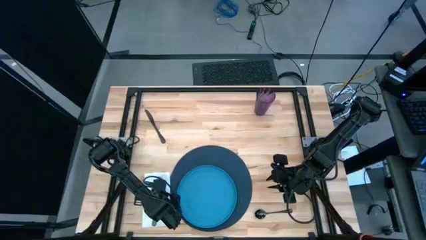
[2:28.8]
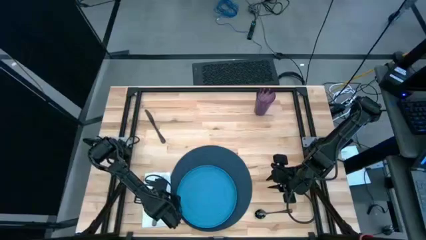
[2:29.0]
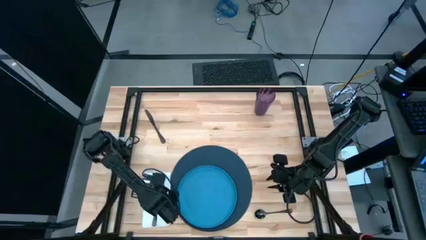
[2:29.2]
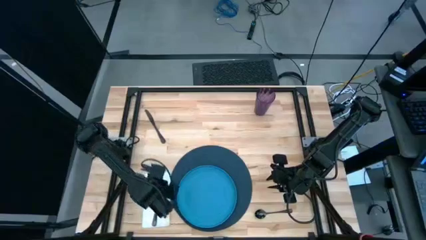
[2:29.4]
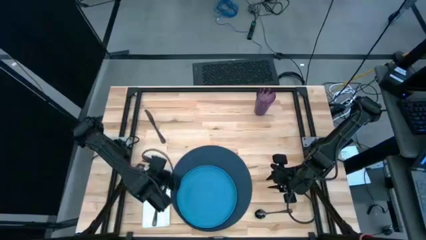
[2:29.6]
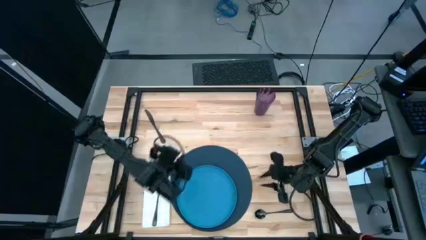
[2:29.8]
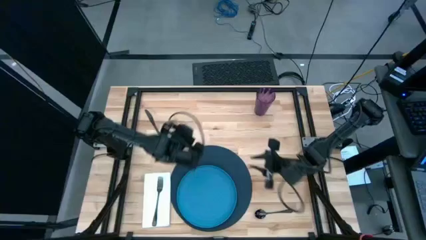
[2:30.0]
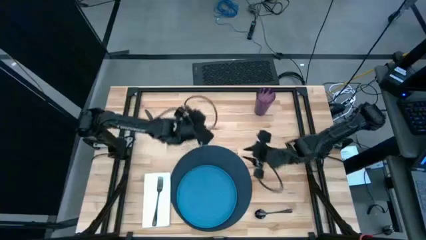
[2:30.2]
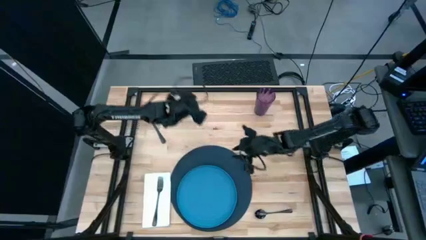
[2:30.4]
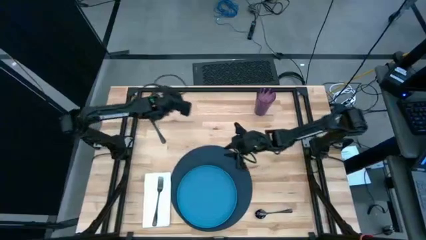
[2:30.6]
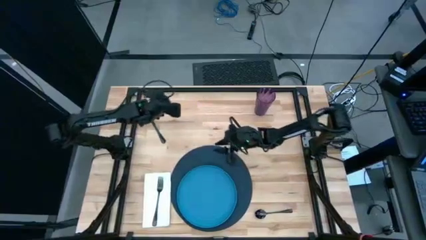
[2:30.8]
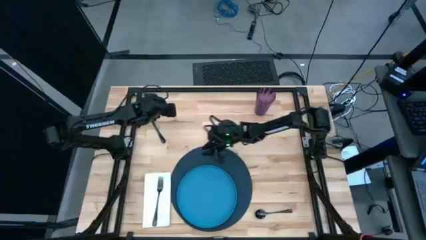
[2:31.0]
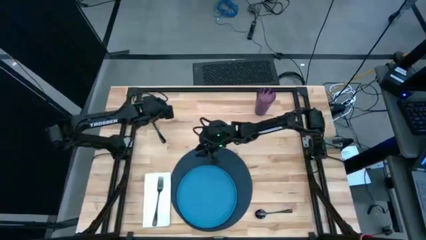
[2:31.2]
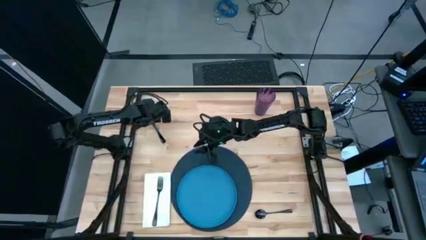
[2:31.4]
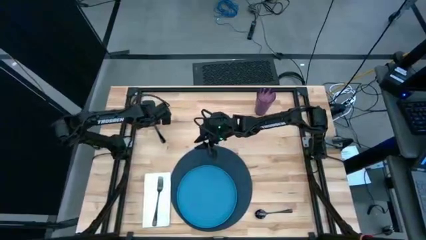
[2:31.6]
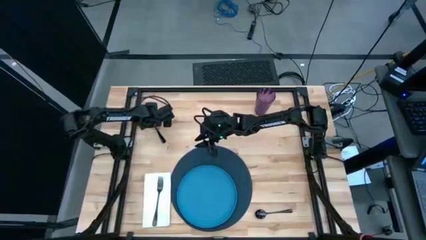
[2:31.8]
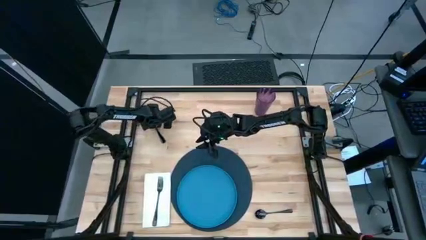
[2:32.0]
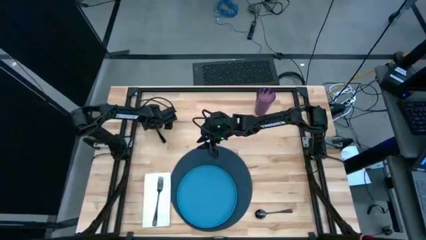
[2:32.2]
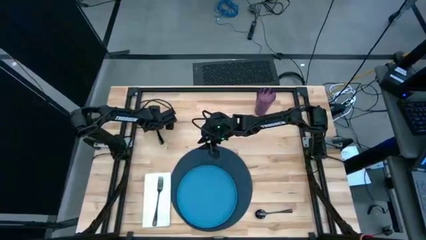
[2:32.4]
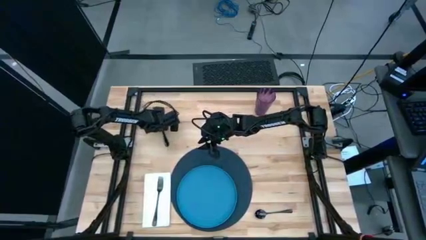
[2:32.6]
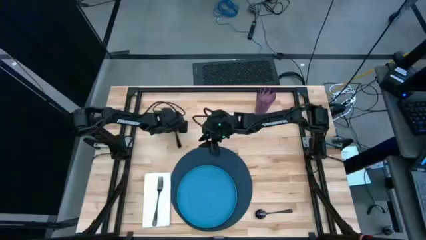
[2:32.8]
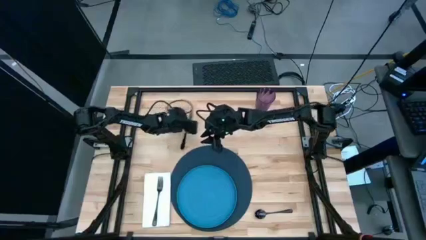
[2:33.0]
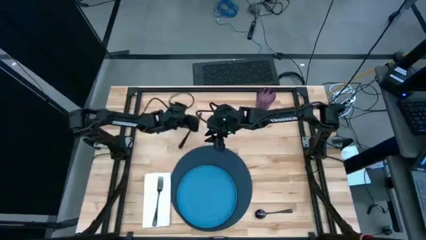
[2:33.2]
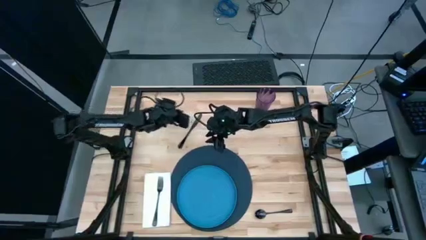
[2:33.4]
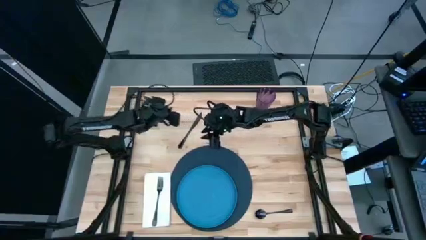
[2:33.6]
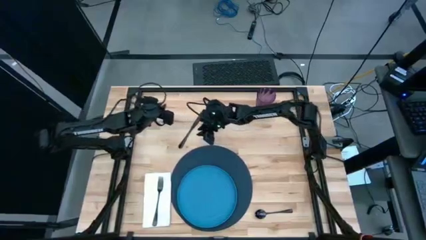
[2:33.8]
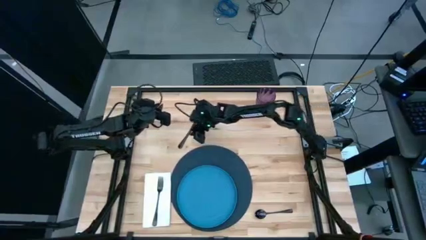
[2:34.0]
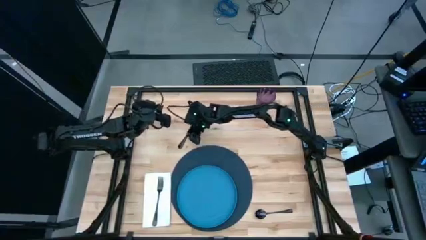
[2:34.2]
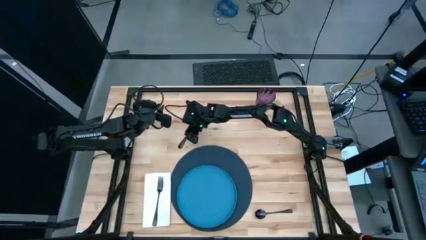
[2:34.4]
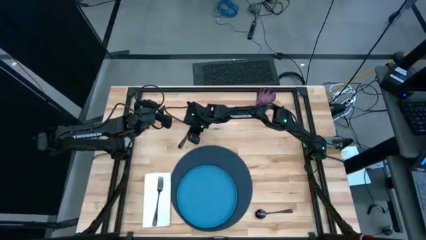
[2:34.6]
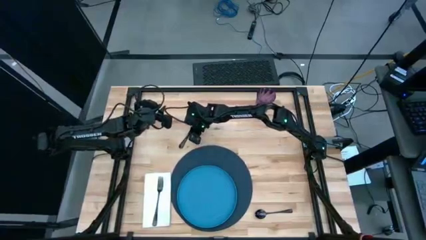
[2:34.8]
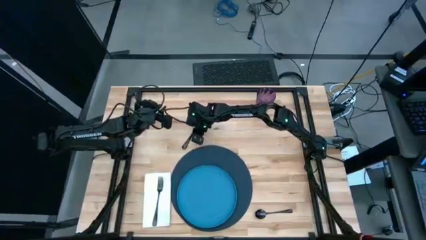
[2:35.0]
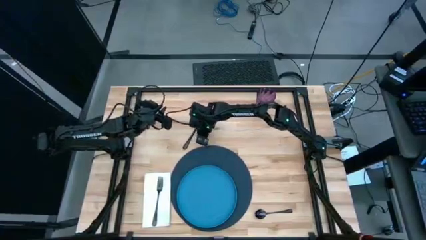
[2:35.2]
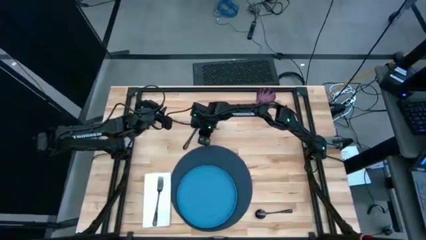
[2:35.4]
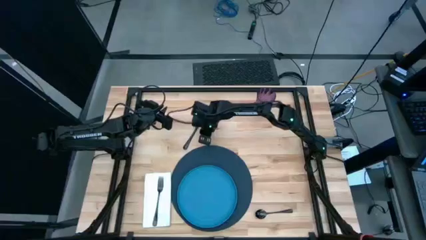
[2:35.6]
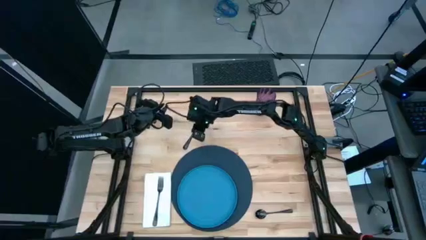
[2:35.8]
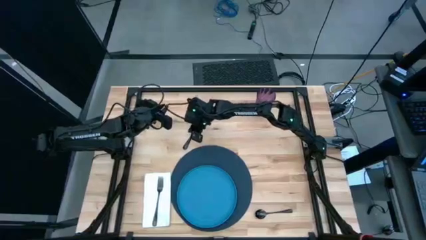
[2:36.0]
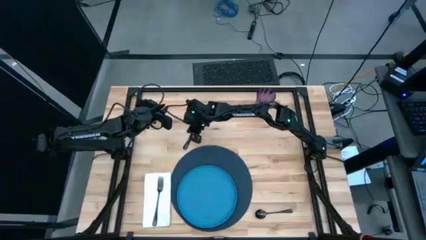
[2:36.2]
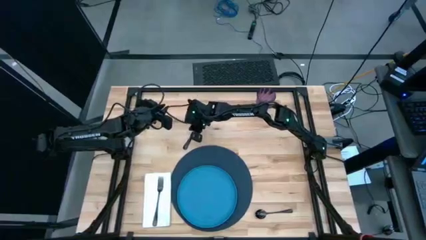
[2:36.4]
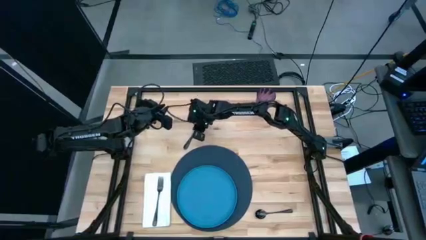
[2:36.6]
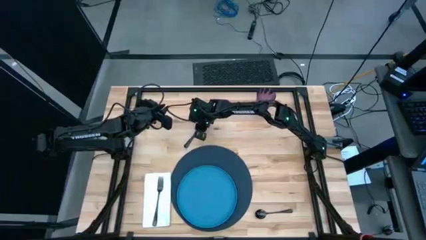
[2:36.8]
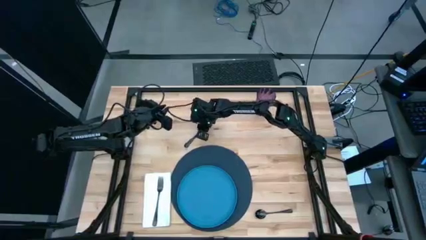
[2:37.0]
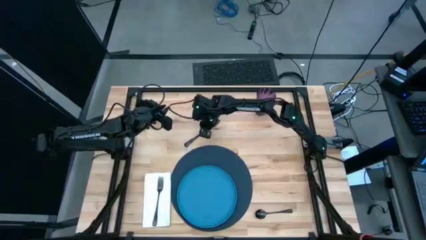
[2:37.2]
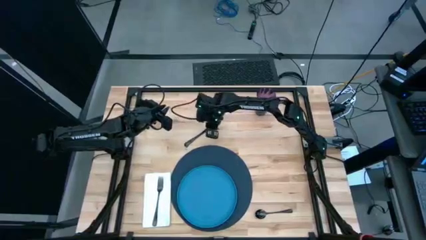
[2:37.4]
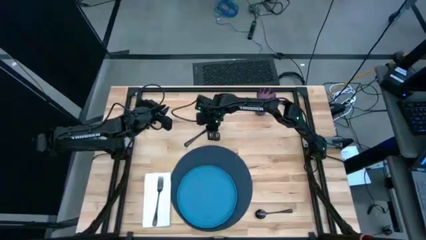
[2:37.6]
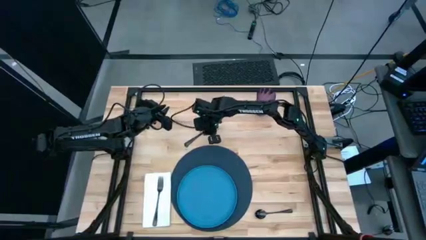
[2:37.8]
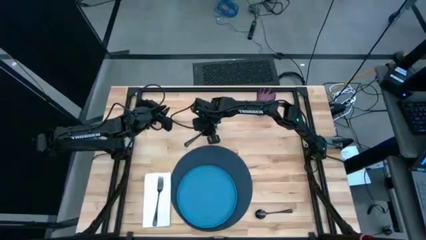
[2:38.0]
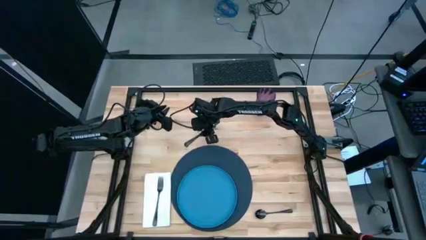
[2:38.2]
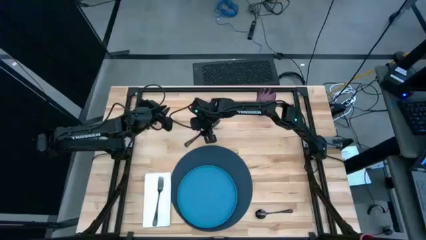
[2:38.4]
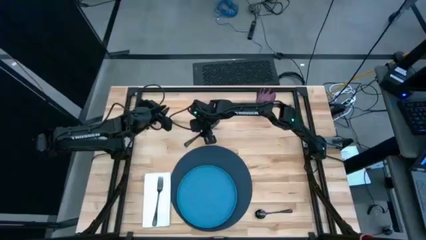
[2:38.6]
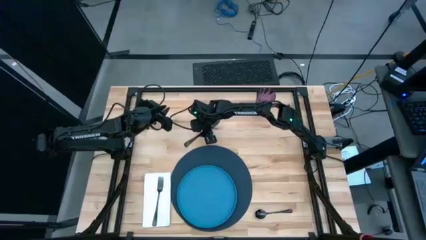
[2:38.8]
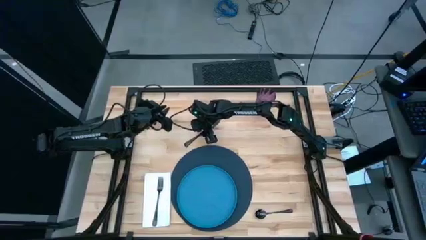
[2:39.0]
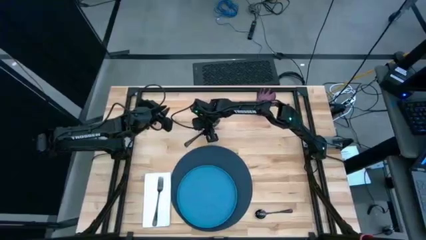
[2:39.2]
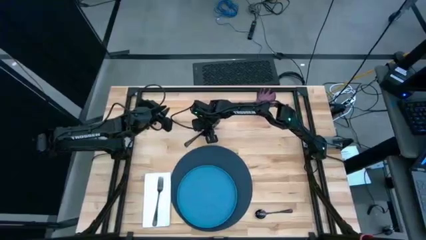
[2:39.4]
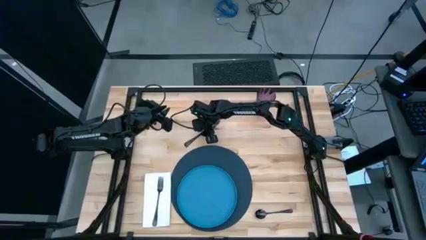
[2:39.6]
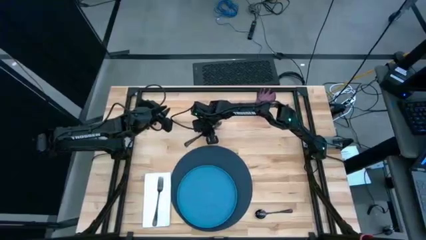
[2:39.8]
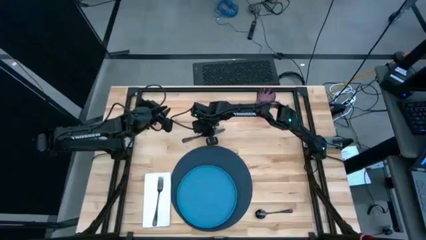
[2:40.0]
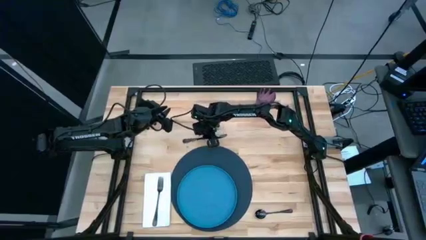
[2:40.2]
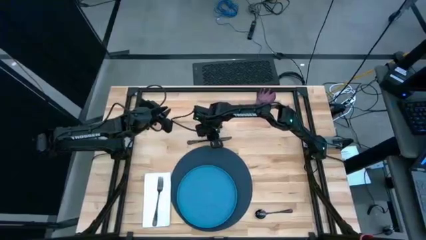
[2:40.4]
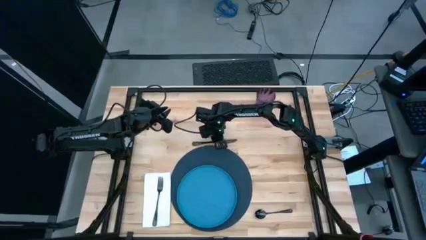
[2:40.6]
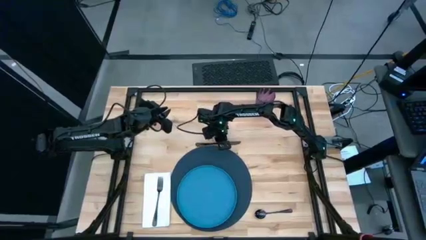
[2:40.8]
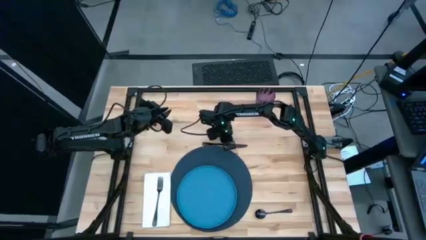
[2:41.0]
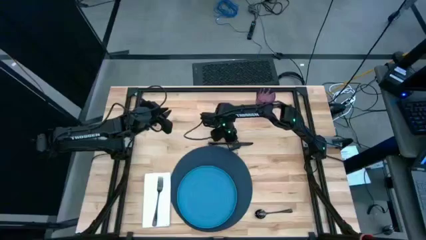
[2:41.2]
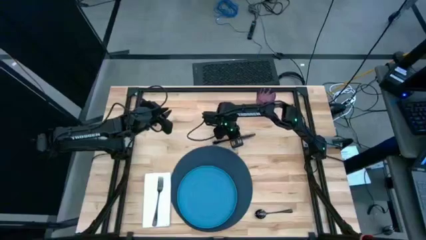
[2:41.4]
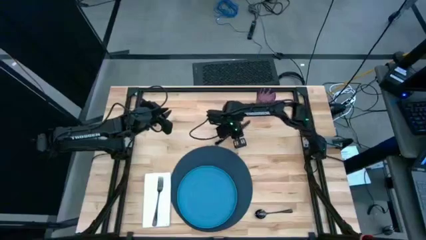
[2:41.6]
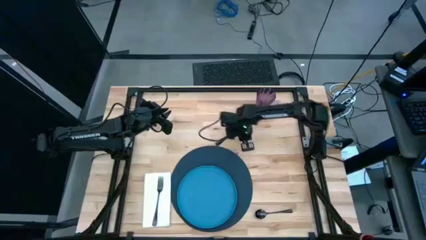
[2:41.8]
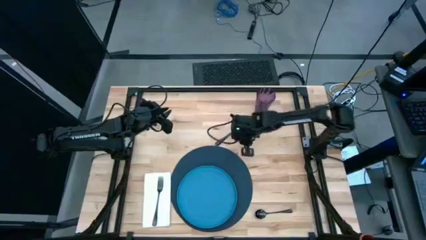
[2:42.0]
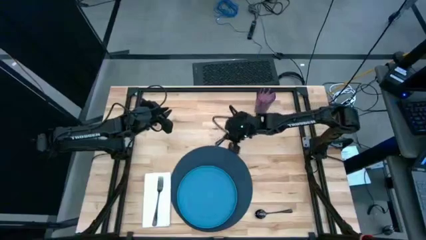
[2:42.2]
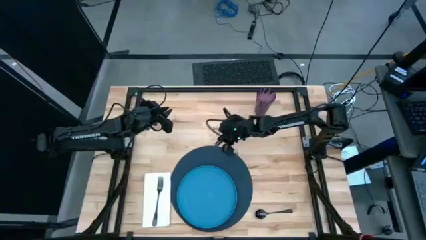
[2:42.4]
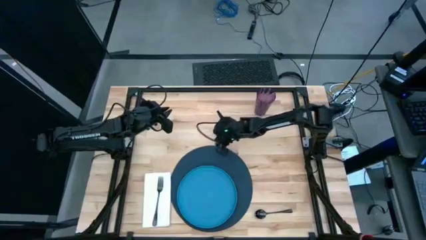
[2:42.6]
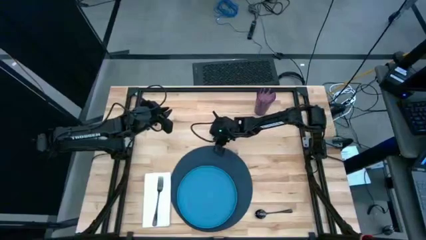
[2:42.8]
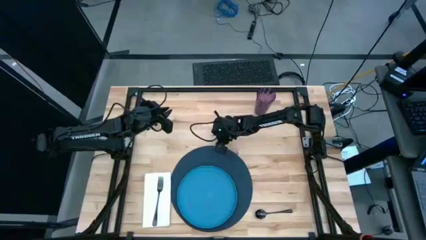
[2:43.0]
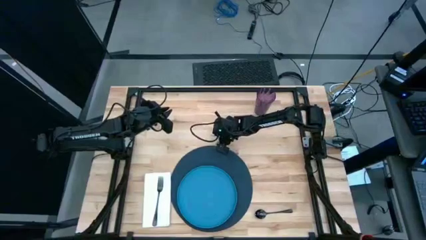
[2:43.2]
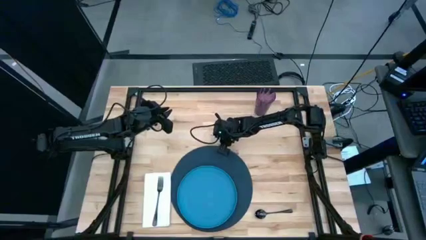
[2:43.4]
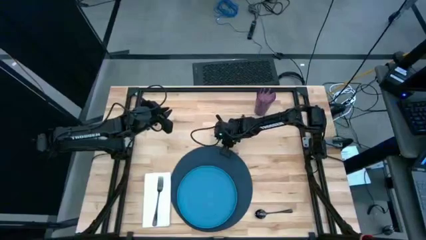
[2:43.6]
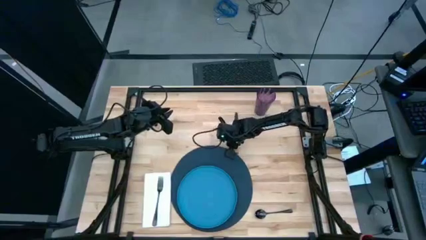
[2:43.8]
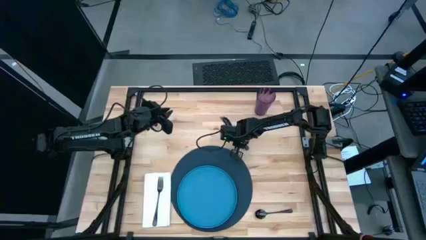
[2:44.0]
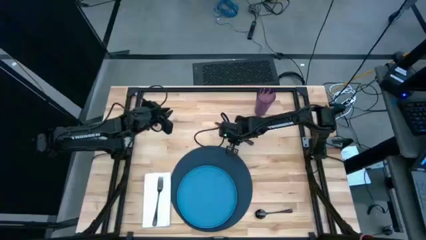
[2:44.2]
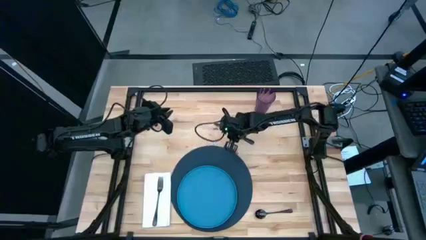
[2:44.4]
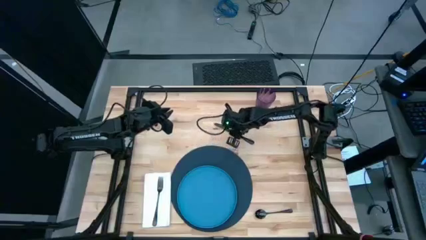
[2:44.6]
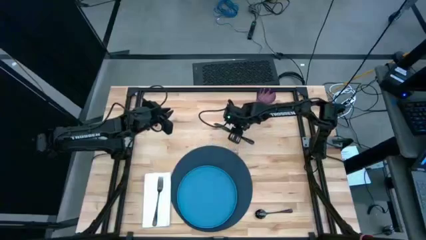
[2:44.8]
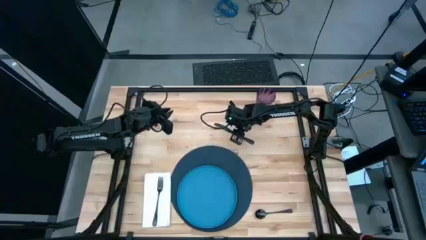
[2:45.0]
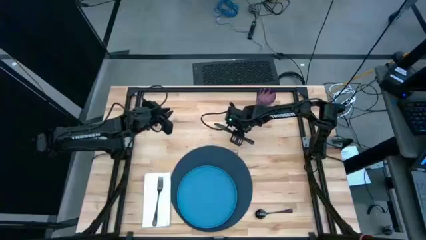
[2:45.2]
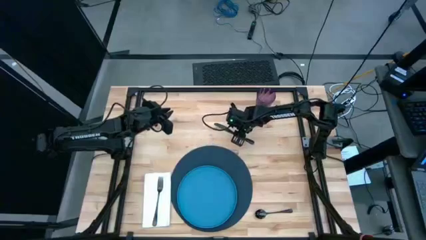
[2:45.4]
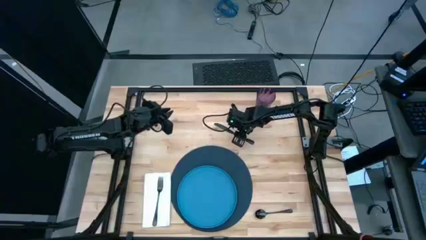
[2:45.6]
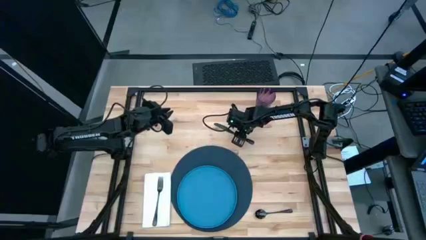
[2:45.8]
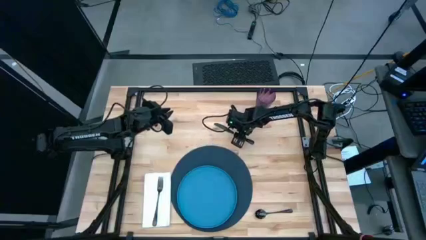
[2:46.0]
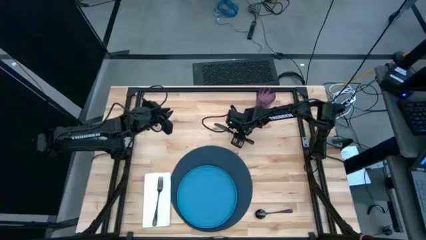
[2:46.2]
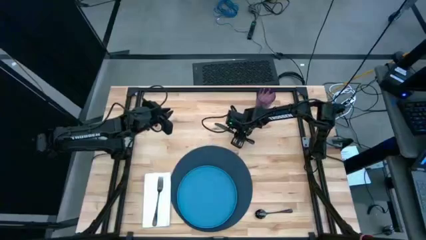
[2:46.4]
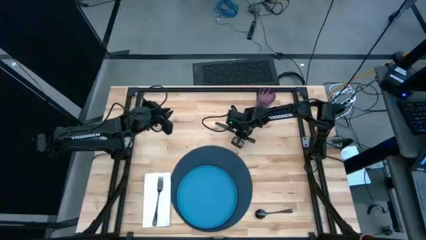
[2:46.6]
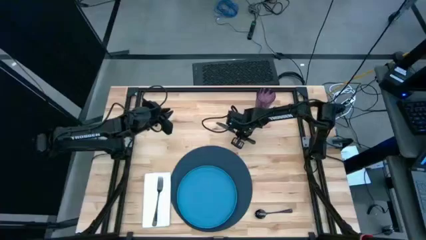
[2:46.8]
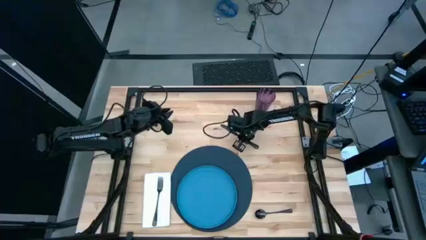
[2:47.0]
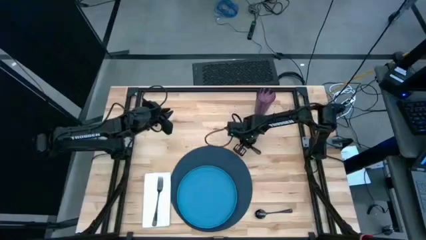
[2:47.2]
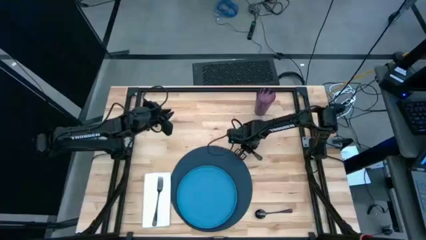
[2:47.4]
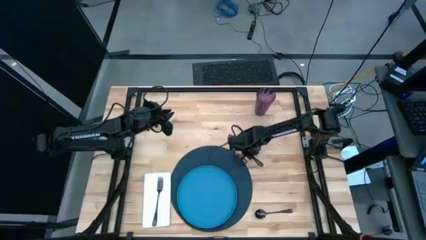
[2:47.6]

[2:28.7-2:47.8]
Task: Set table place
Put the black knife to the right of the dark blue placemat
